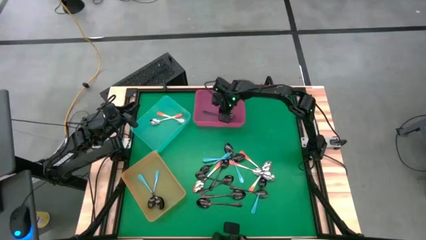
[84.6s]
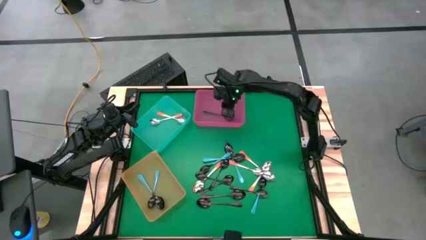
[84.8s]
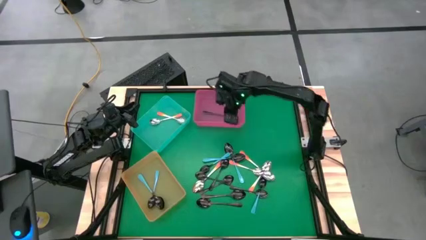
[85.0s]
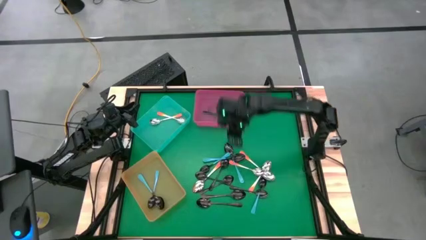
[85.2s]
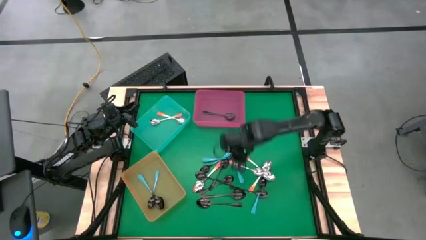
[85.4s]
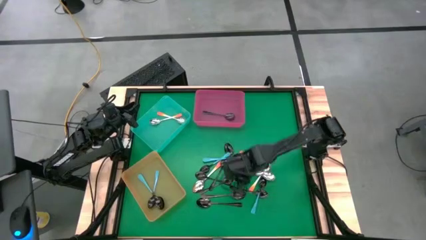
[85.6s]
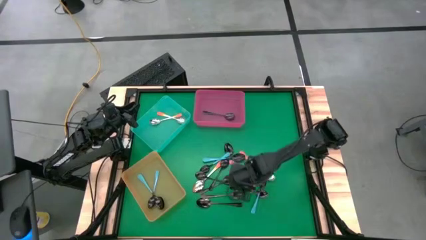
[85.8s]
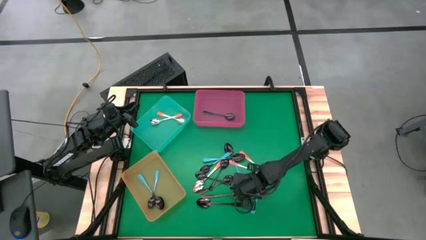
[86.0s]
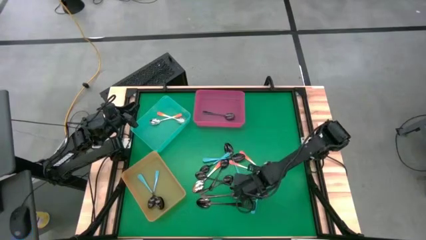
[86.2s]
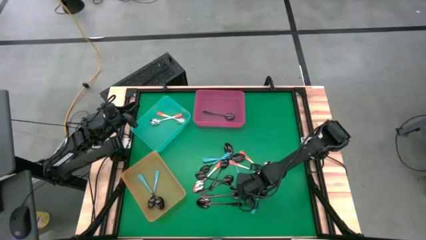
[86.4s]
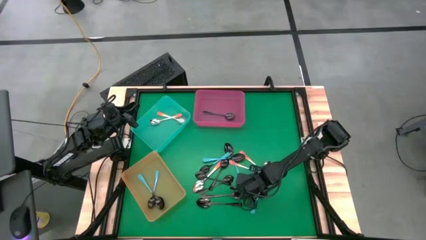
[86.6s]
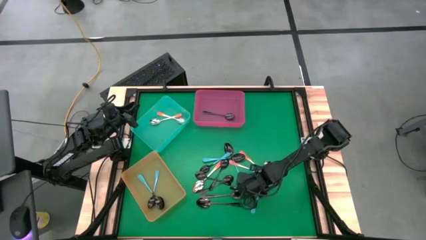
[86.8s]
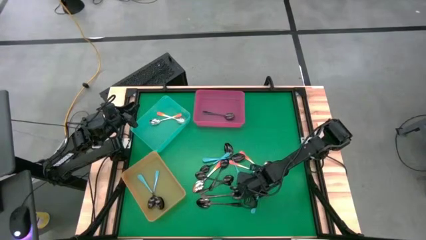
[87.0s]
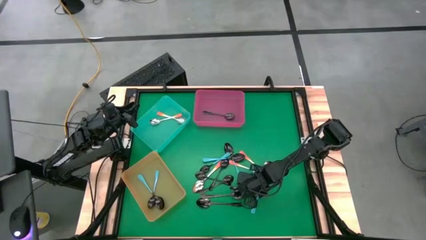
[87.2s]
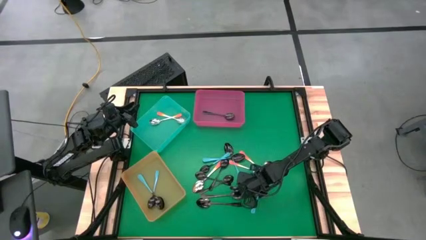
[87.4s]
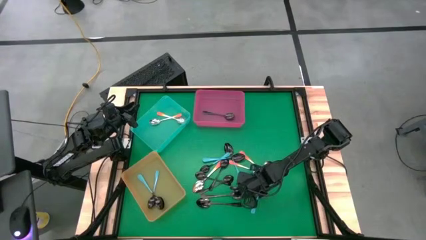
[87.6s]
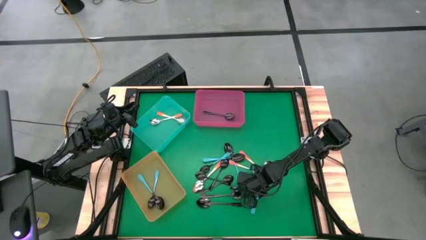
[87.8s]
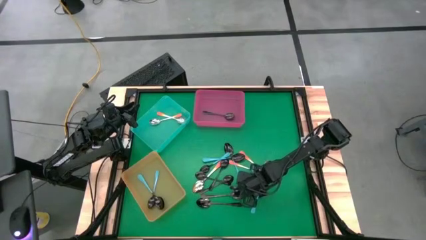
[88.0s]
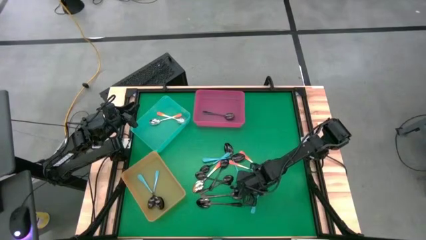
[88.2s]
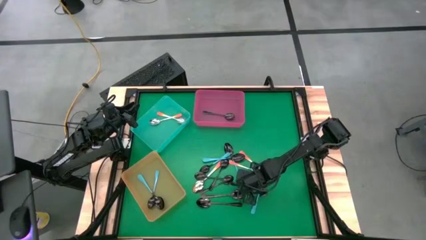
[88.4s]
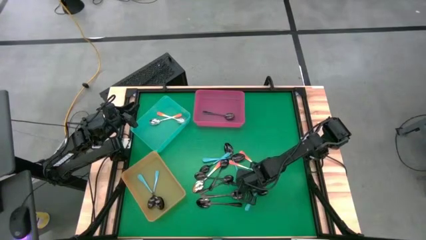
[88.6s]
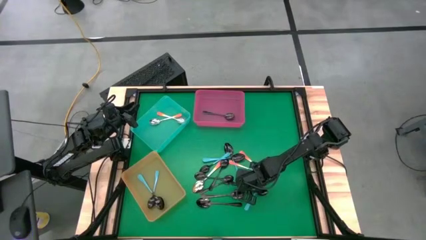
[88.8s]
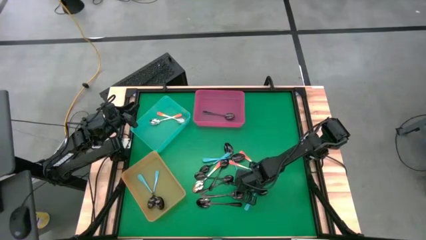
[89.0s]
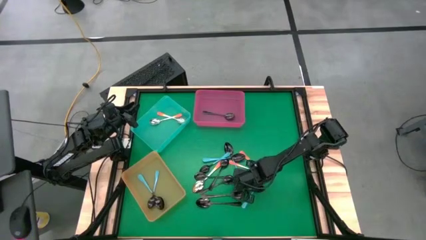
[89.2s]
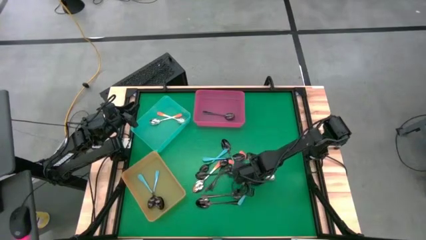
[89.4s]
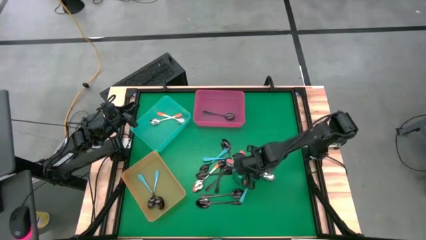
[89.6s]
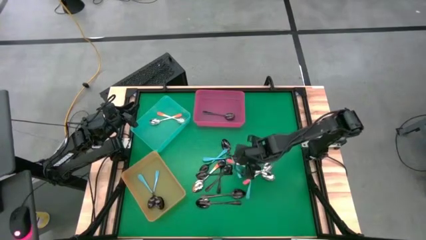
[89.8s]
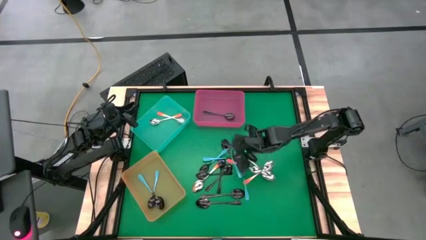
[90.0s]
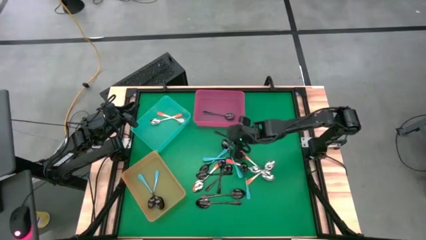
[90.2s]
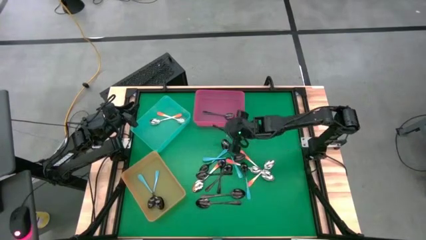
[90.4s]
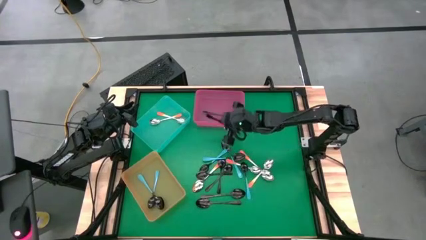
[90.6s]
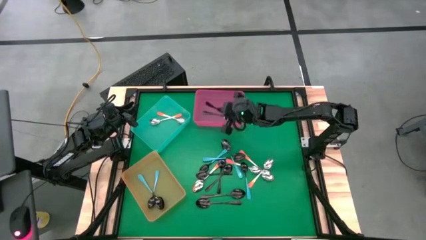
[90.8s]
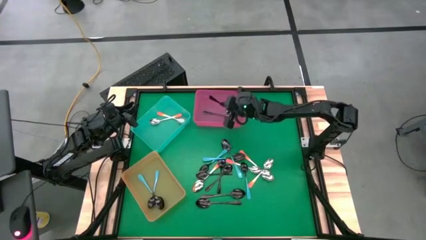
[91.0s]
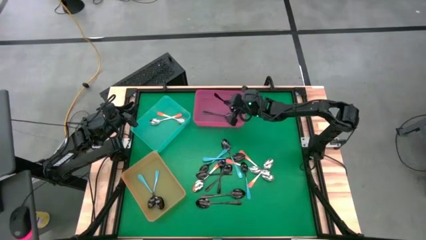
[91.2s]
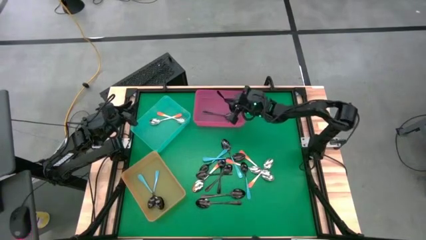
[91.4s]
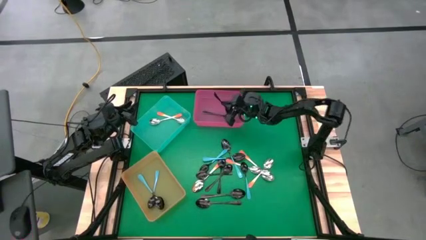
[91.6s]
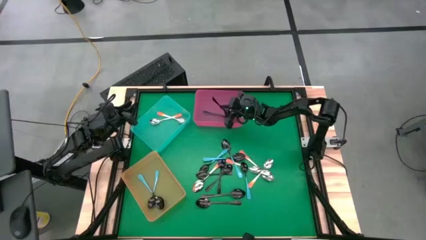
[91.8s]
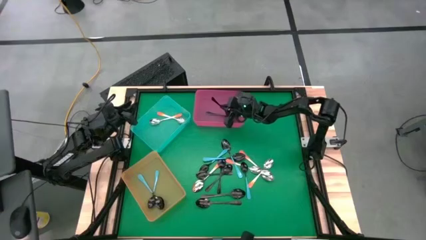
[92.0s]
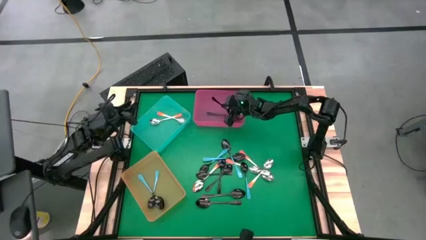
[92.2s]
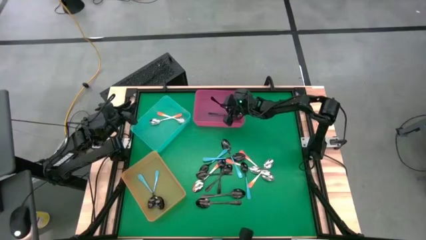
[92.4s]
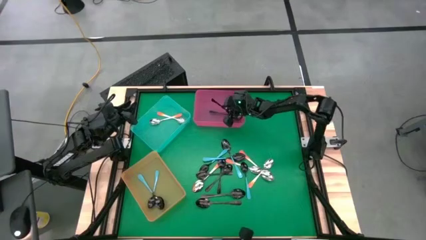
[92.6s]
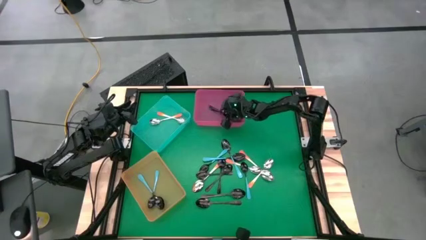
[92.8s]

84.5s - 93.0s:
Task: Sort silverware by color (type)
Put the black spoon into the pink bin

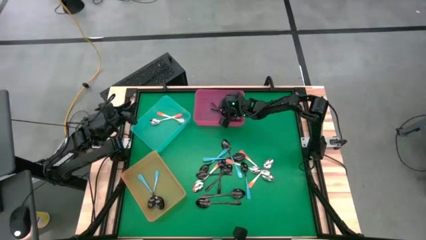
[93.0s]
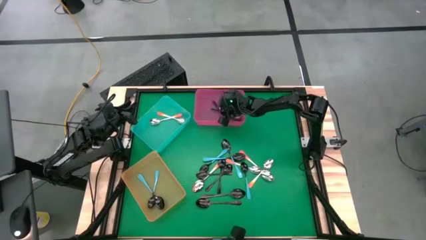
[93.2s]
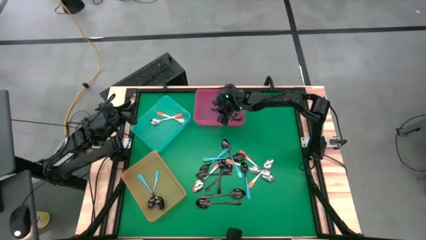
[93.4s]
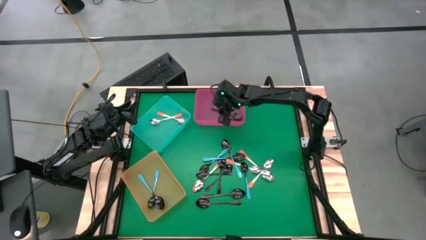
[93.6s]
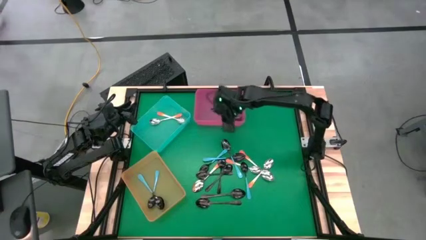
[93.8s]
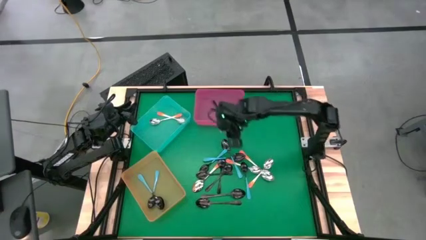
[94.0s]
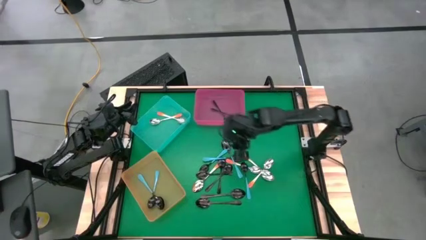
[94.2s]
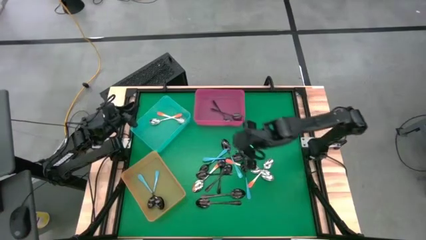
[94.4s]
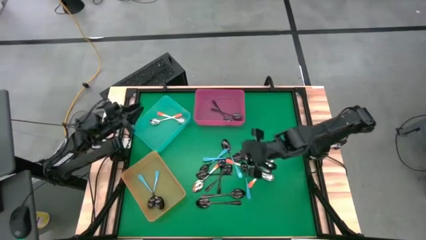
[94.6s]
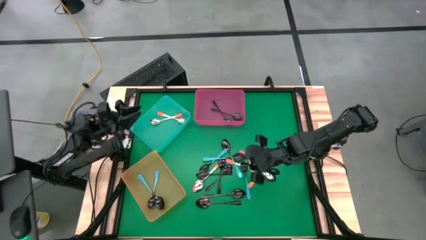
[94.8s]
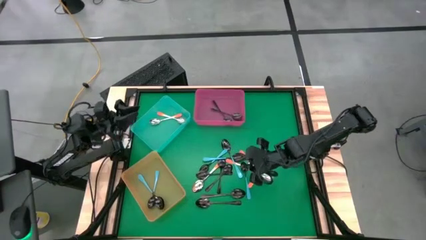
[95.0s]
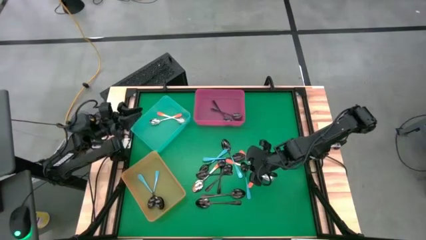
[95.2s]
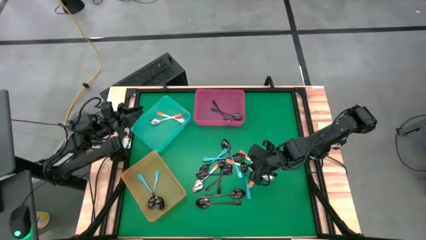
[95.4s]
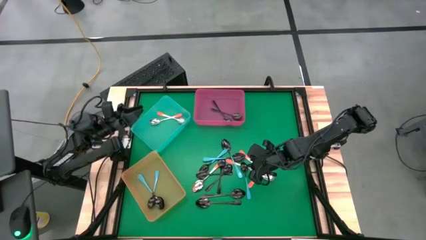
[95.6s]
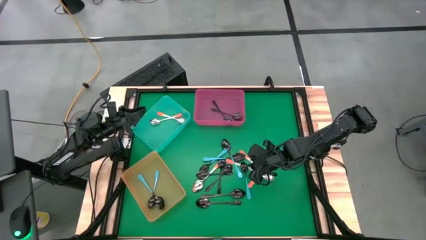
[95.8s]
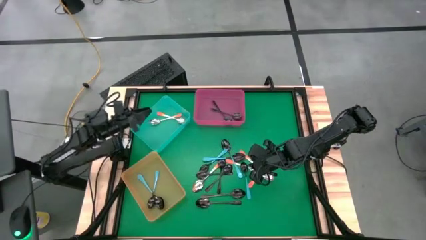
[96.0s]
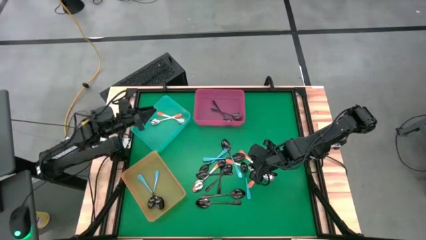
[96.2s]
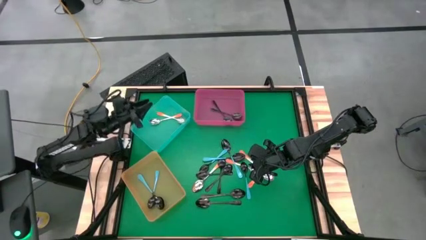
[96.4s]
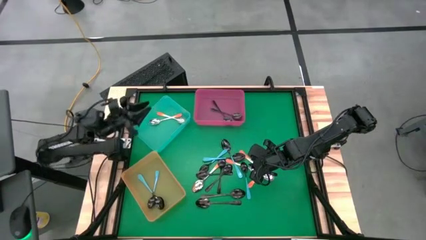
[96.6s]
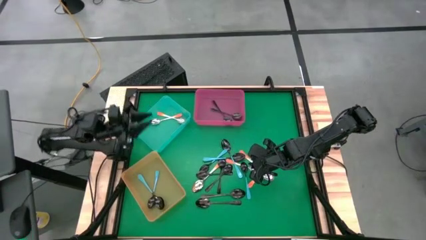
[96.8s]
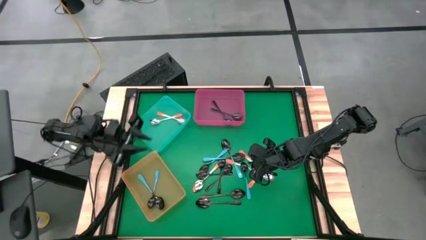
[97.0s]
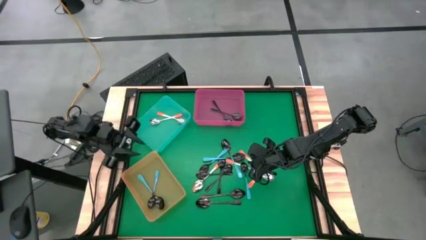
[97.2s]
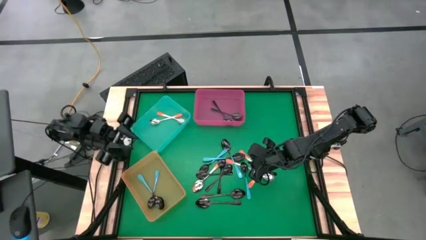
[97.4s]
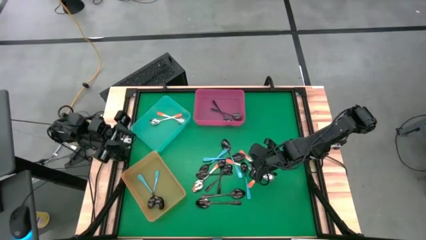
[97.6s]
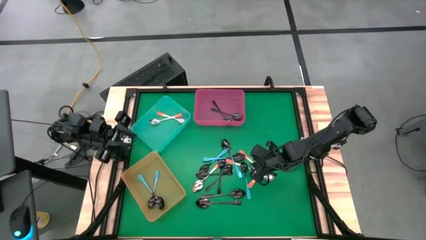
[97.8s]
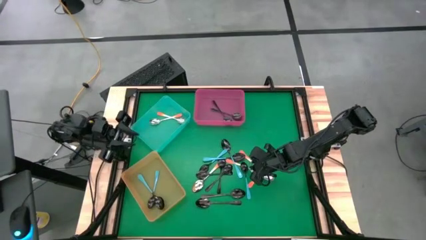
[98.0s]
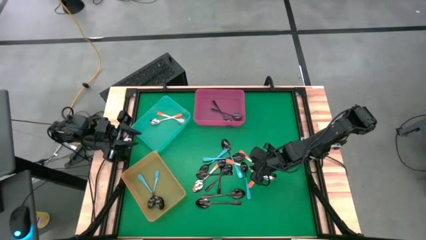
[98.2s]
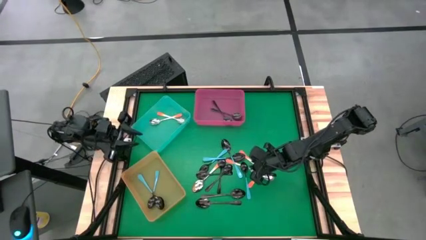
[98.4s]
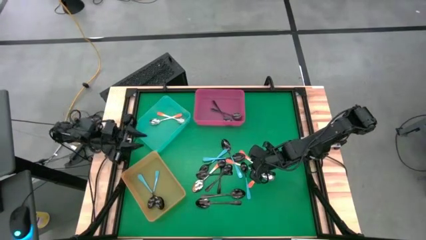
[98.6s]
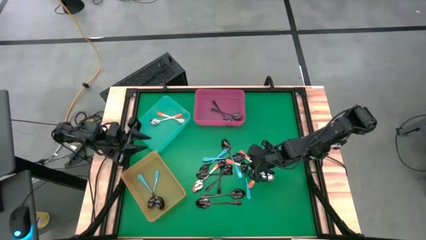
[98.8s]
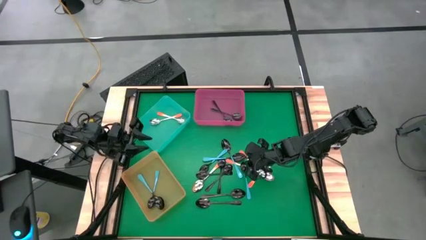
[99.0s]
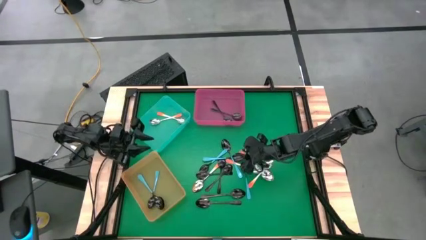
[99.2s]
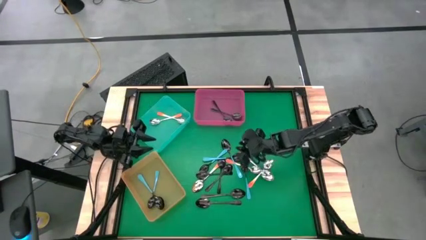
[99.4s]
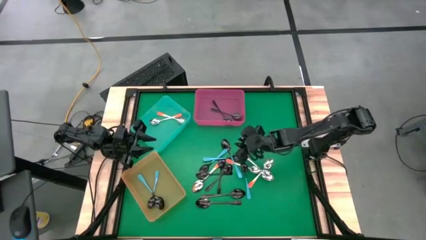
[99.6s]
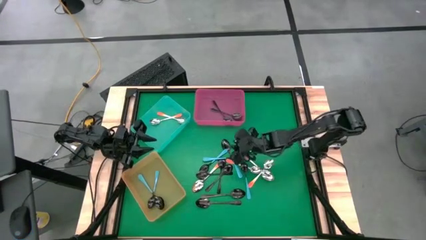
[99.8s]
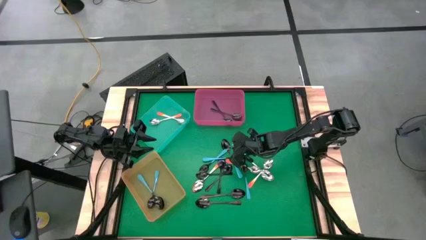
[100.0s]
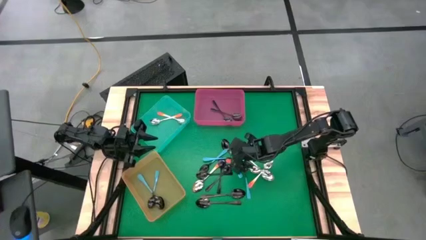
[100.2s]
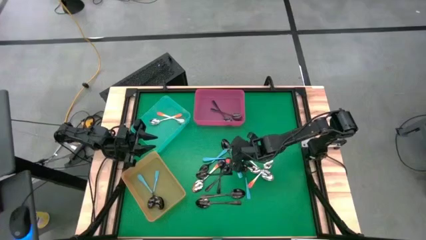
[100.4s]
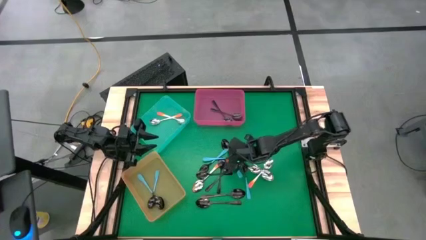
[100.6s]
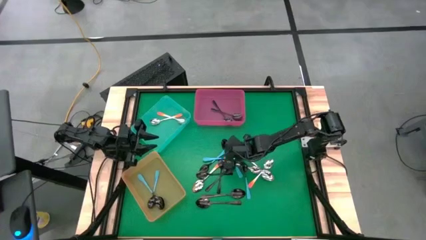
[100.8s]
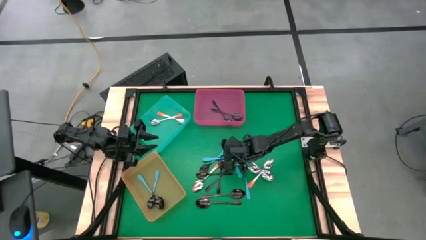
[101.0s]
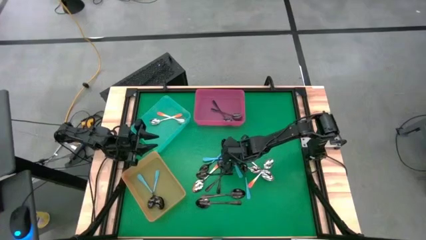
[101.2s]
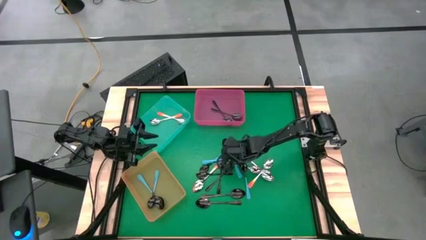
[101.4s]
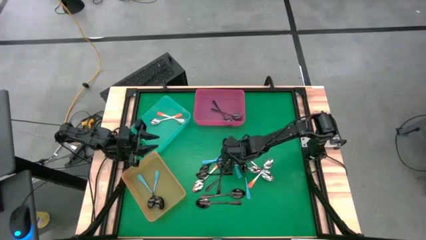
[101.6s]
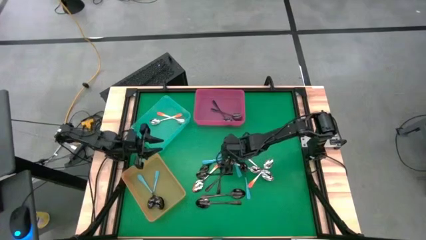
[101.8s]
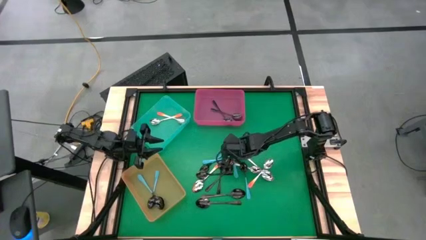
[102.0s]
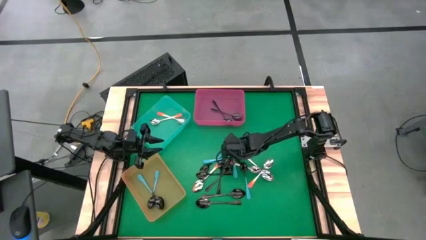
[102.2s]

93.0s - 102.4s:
Put the blue spoon into the orange bin
